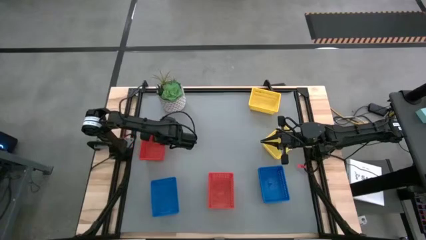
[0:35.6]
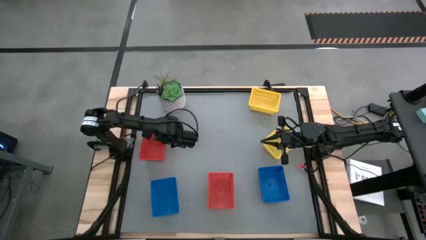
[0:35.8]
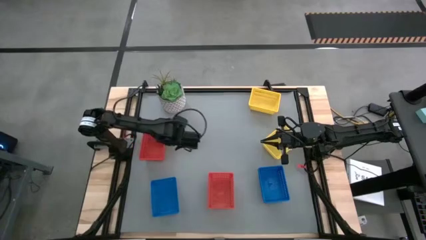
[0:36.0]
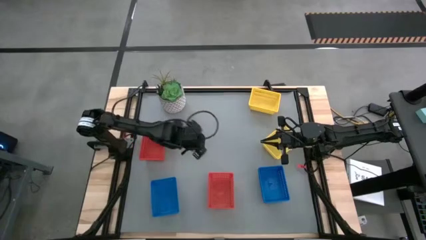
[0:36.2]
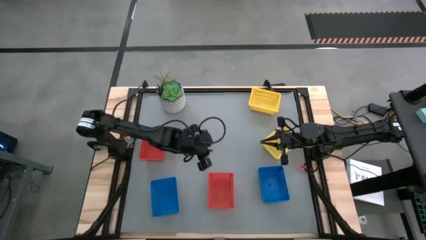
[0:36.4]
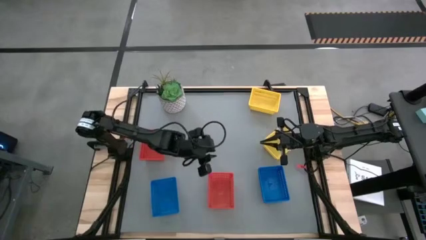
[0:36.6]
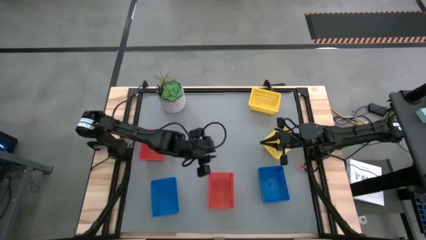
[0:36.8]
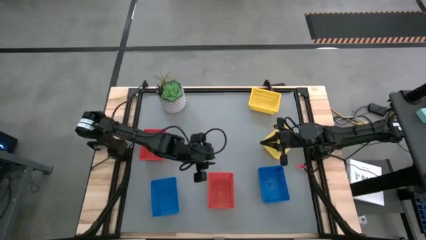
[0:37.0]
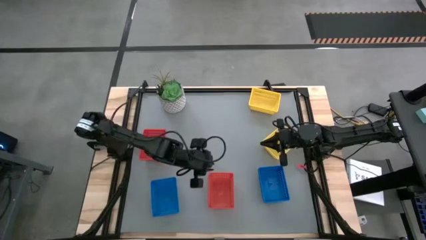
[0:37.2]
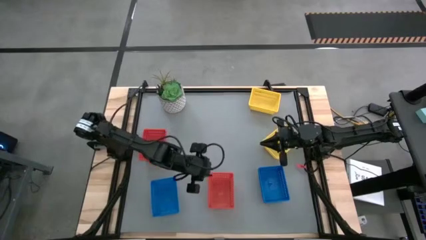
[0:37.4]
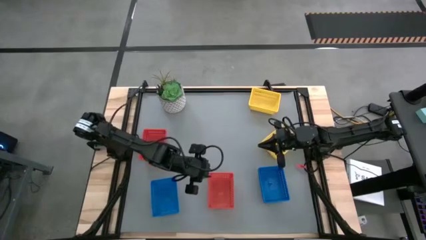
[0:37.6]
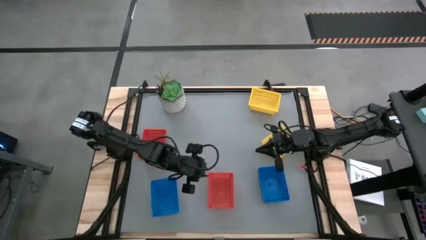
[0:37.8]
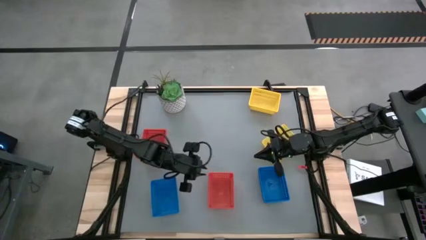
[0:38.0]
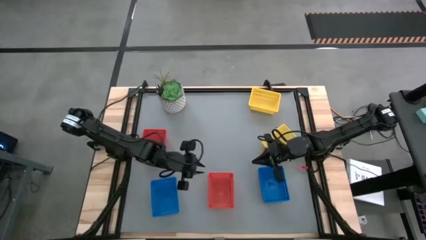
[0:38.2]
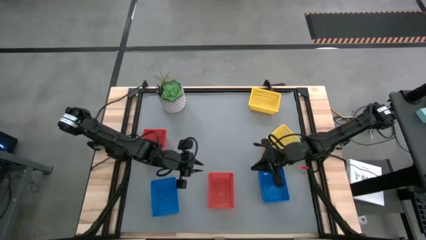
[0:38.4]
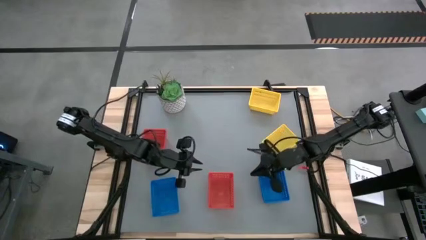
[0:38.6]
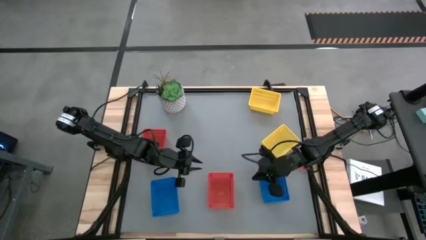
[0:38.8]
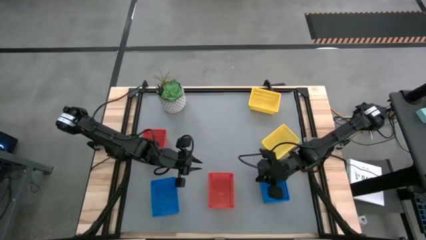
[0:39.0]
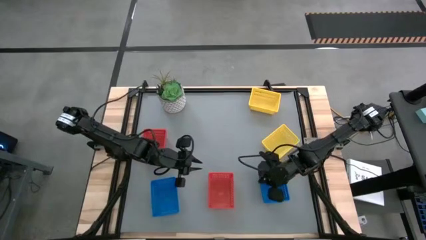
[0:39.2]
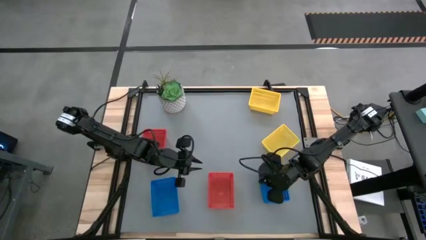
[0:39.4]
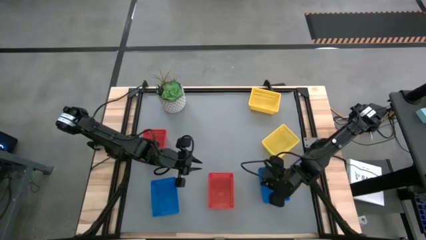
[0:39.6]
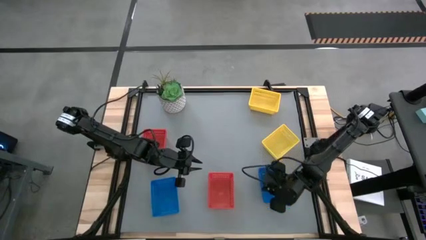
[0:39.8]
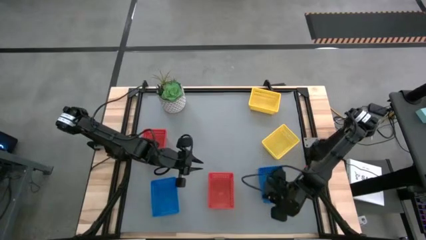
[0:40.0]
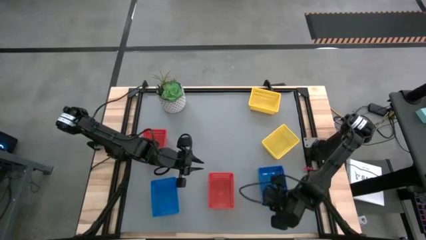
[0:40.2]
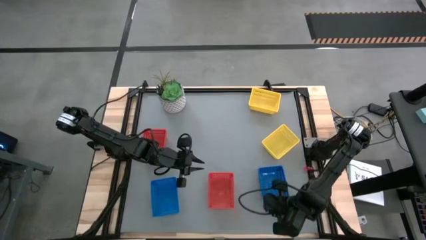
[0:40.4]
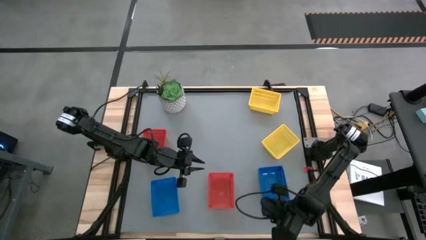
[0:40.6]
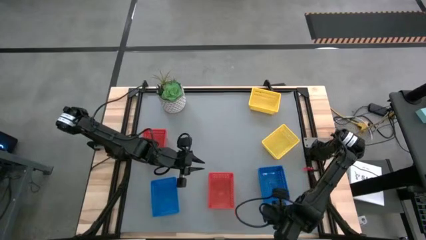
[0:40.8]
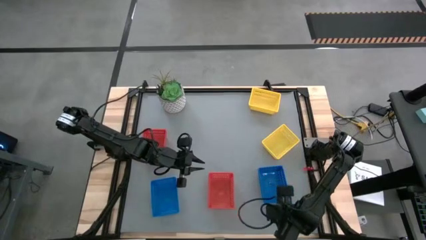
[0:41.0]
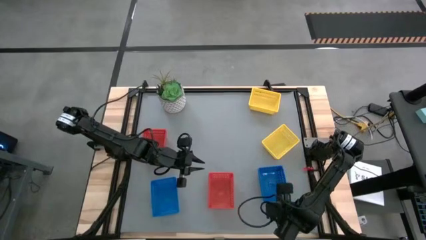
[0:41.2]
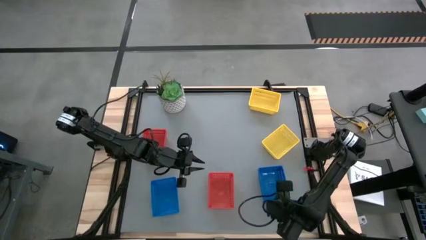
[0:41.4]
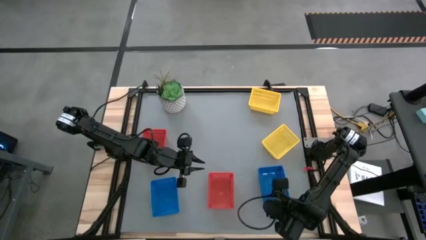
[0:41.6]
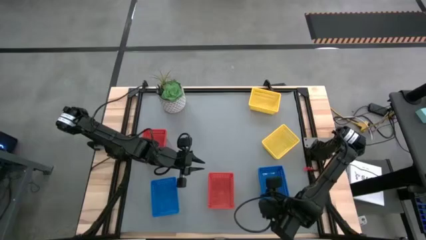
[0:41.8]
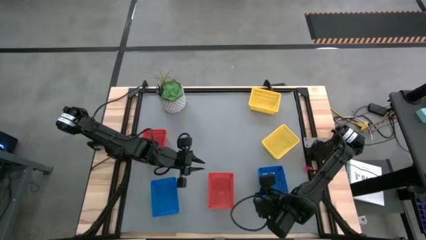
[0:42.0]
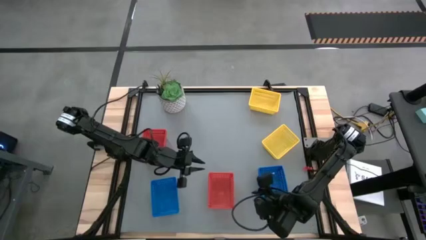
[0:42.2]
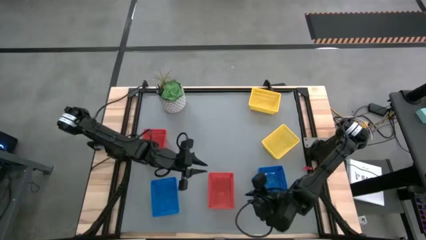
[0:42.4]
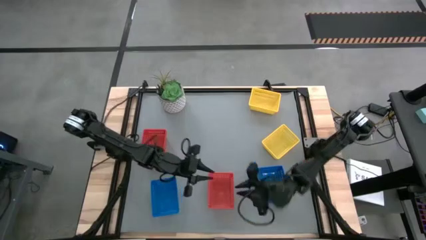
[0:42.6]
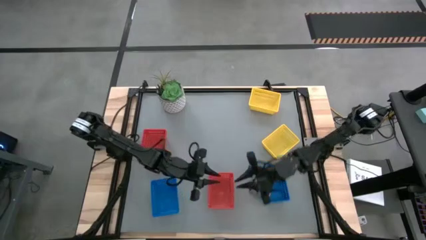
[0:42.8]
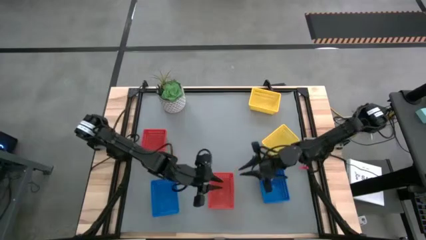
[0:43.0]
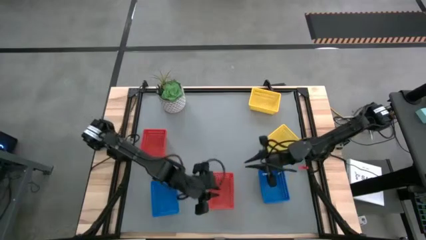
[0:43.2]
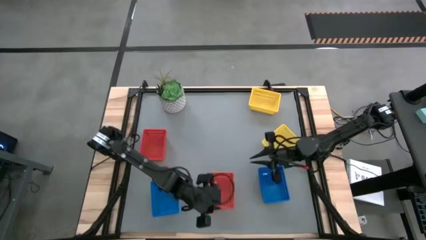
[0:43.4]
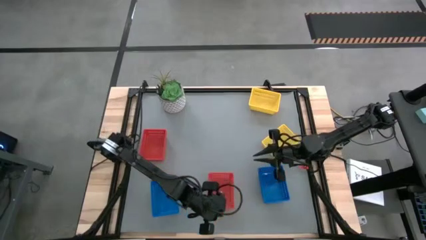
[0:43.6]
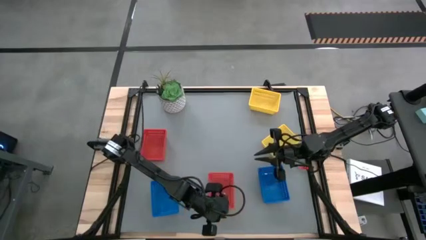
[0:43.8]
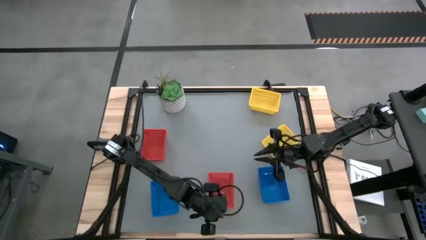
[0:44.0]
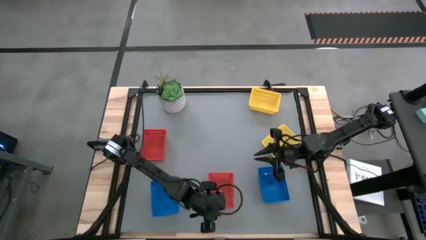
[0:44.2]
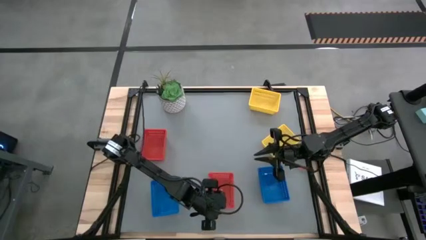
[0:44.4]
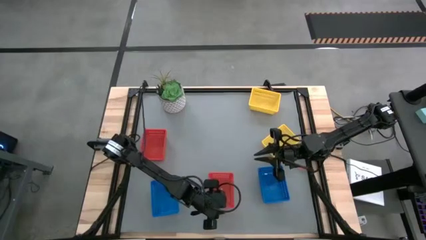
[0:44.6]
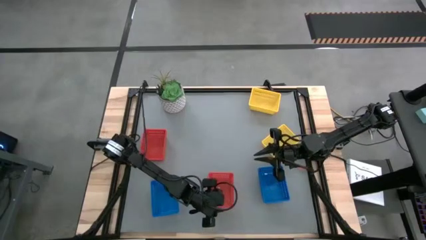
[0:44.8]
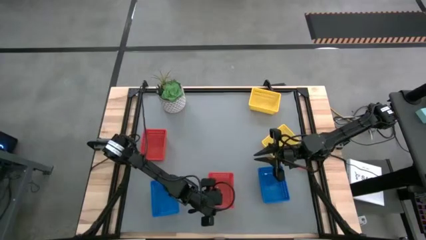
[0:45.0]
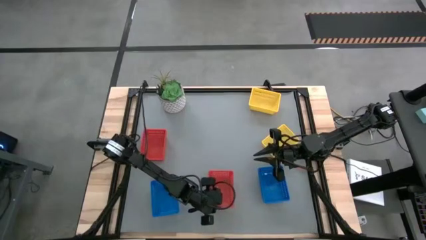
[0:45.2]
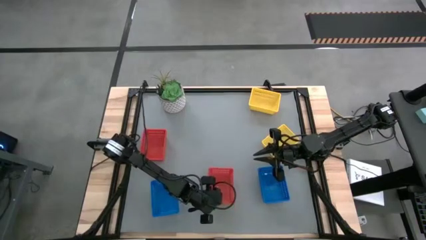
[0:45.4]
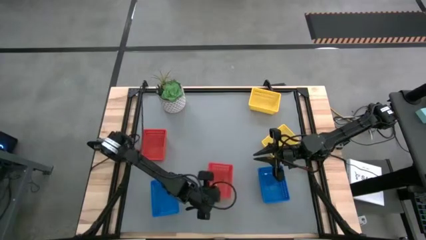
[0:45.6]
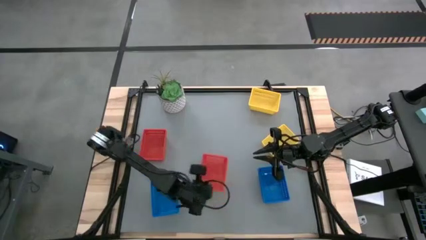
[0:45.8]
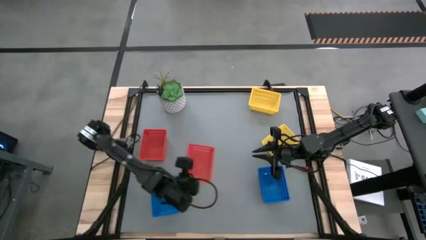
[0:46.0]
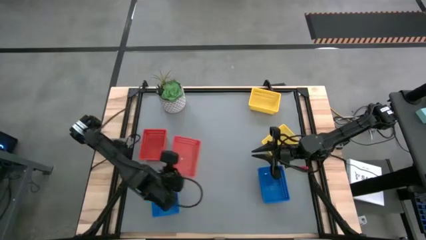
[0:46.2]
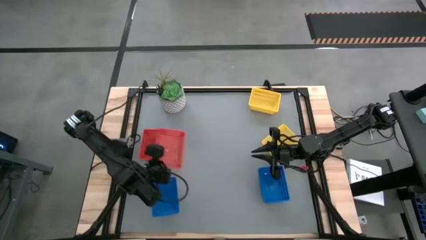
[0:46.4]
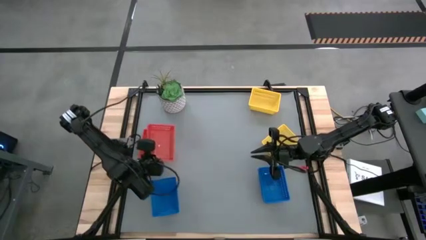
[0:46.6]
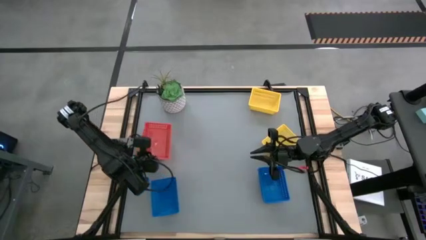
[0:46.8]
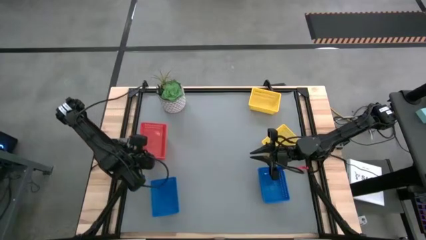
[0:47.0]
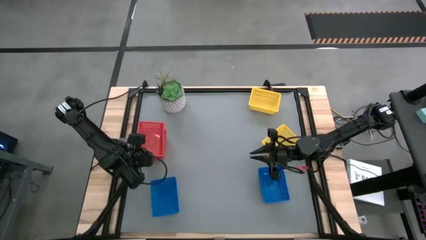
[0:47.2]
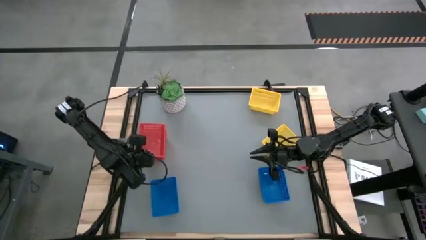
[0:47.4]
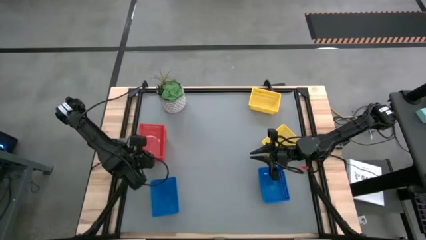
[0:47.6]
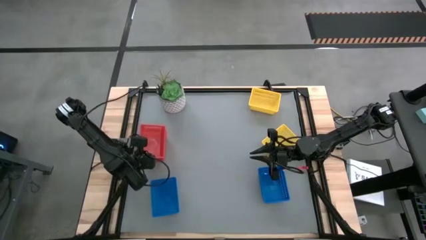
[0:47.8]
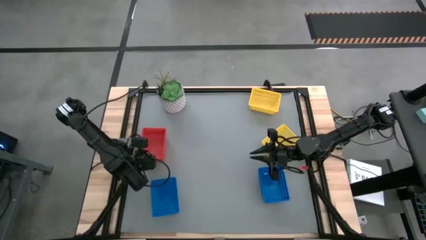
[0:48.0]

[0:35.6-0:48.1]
Stack the bottom red bin on top of the top red bin

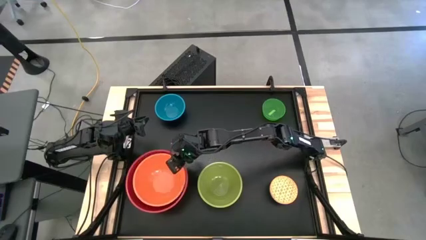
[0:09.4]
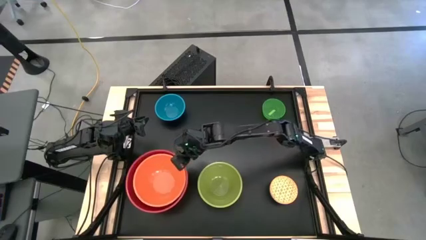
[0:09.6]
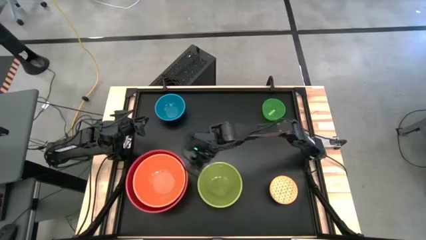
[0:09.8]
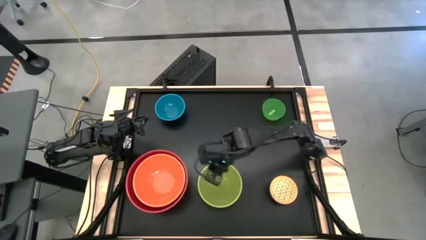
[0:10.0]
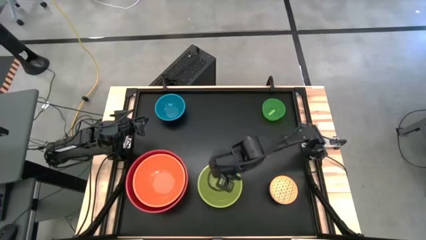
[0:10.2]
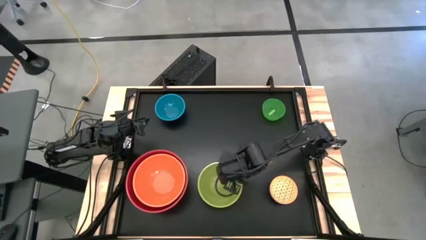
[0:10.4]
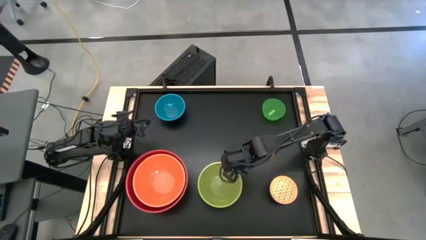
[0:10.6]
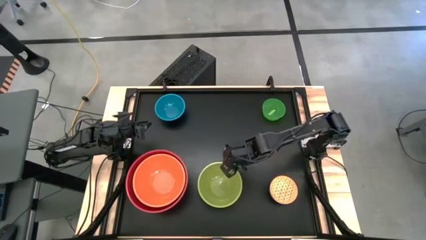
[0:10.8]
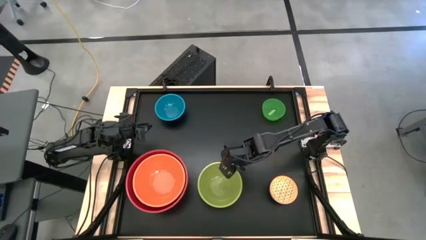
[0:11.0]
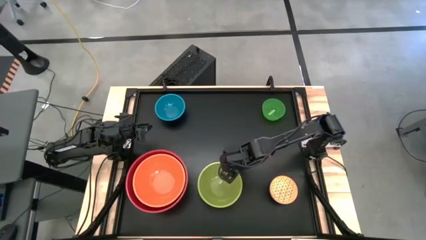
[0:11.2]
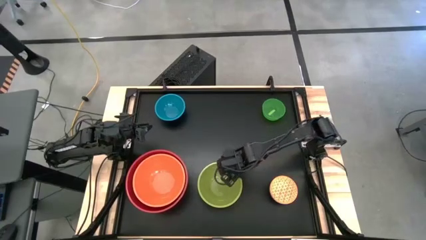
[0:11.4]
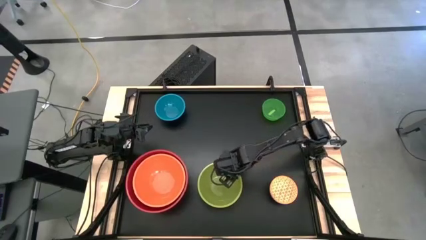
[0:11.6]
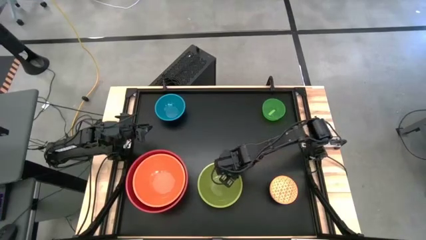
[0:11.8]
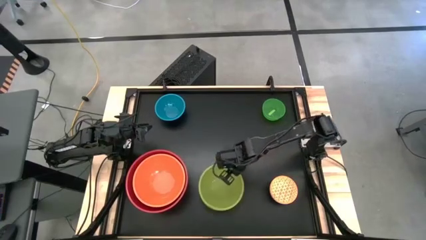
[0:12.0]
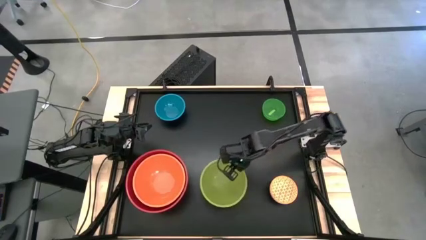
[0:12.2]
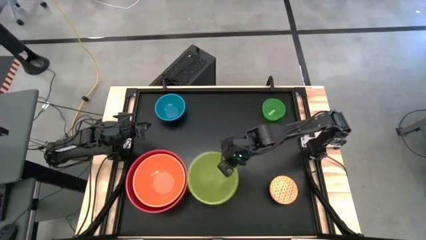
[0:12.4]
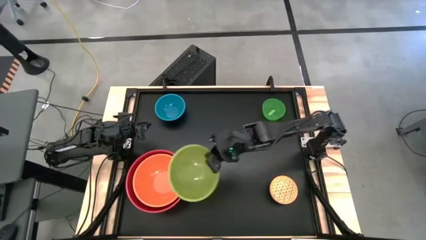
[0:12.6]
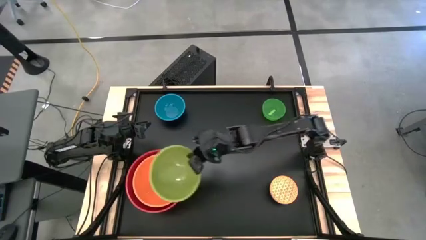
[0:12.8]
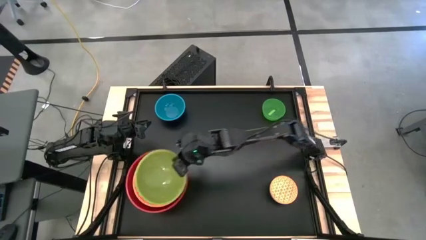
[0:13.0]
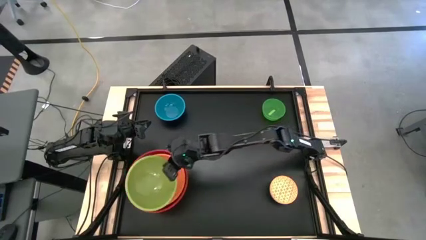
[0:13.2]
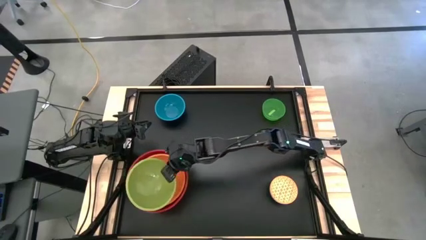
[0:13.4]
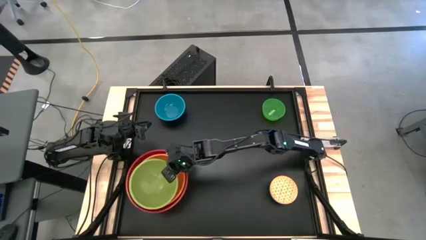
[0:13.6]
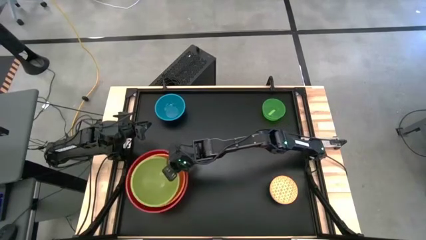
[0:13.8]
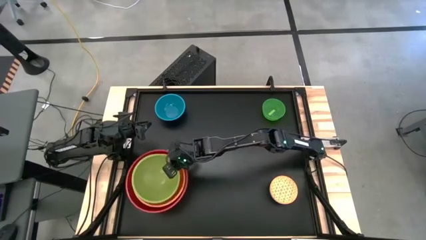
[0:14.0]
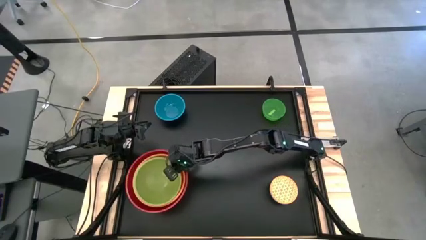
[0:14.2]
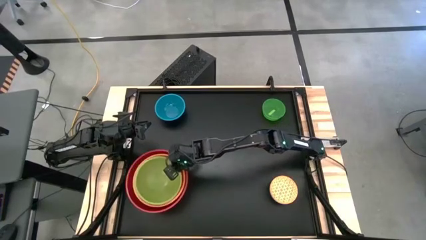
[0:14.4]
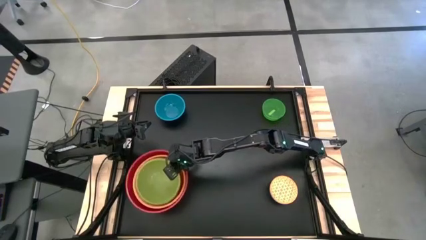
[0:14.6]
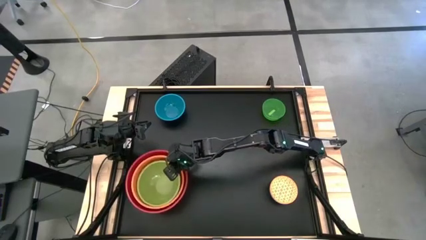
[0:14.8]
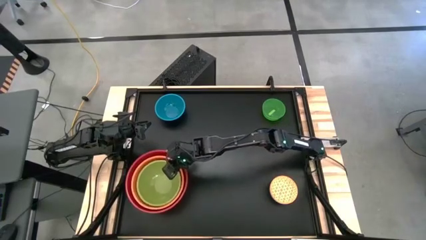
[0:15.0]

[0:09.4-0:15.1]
Stack the light green bowl on top of the orange bowl
